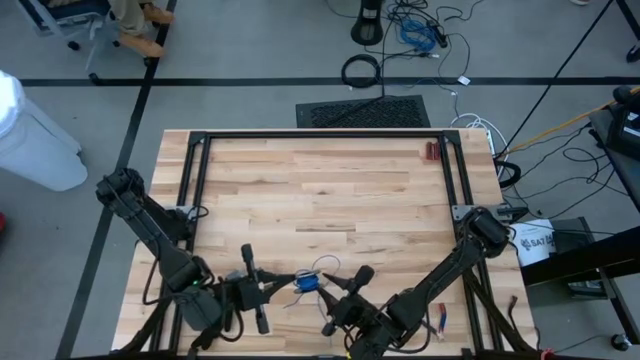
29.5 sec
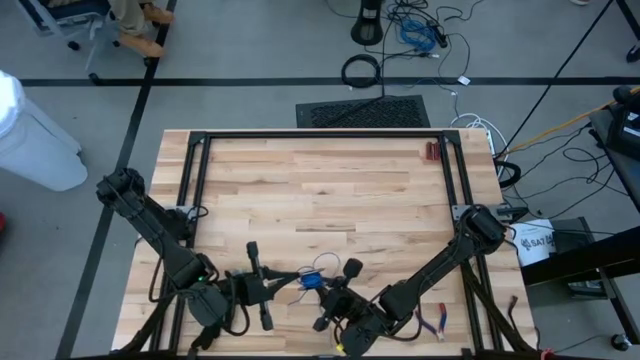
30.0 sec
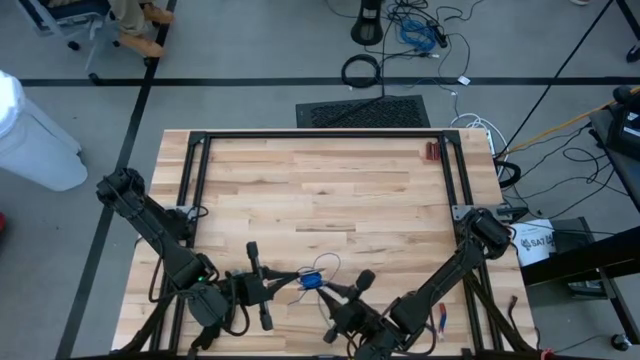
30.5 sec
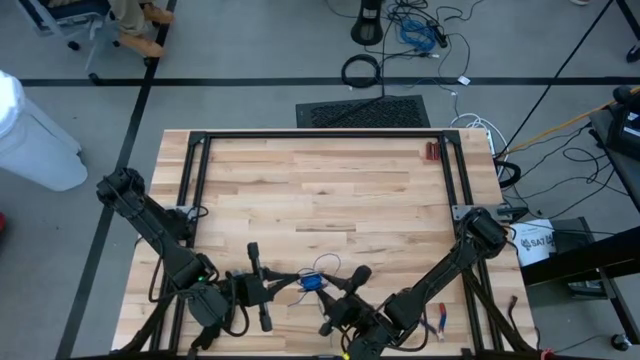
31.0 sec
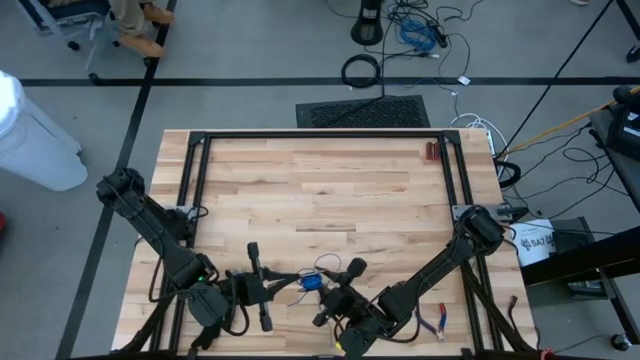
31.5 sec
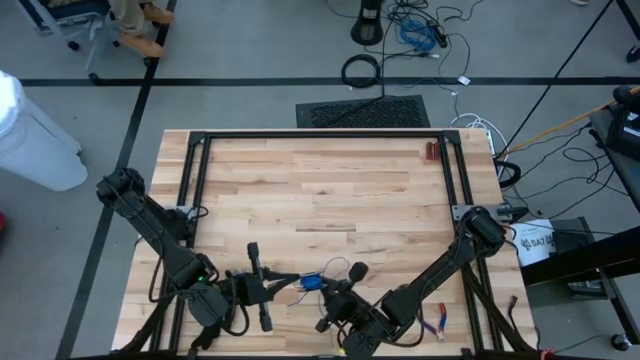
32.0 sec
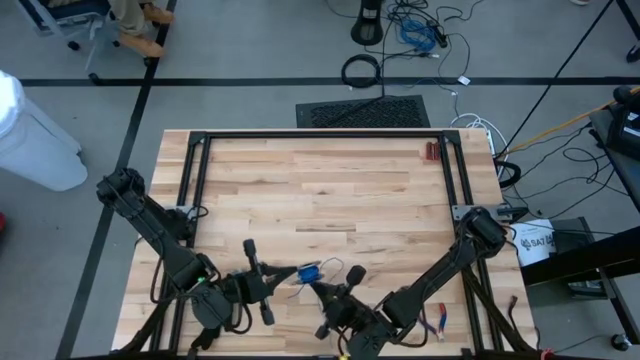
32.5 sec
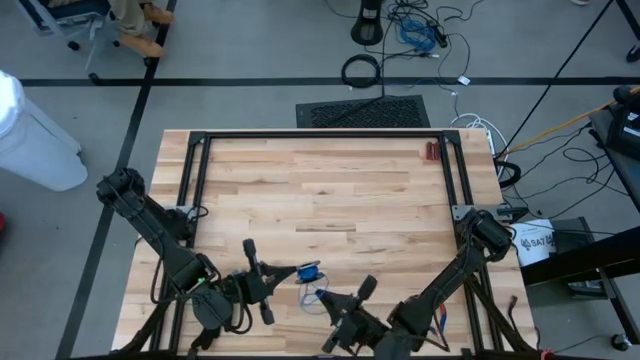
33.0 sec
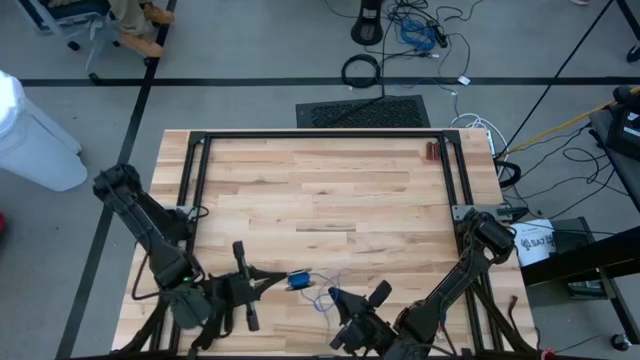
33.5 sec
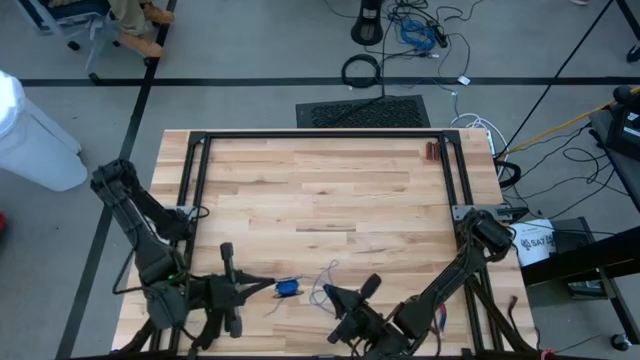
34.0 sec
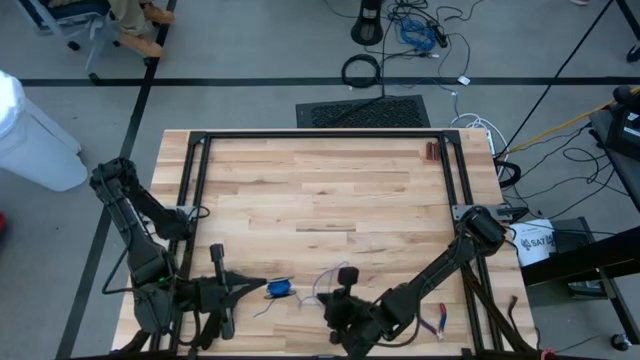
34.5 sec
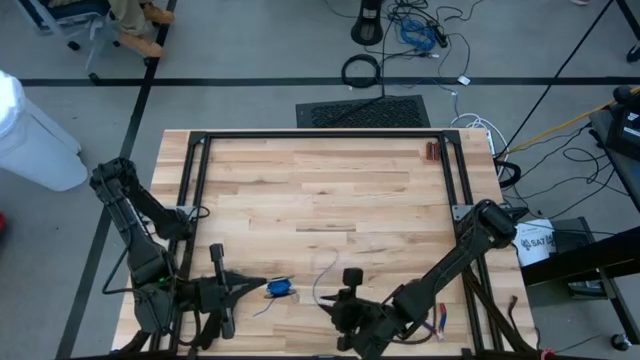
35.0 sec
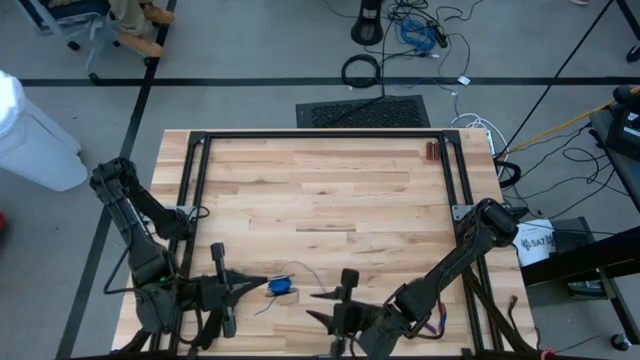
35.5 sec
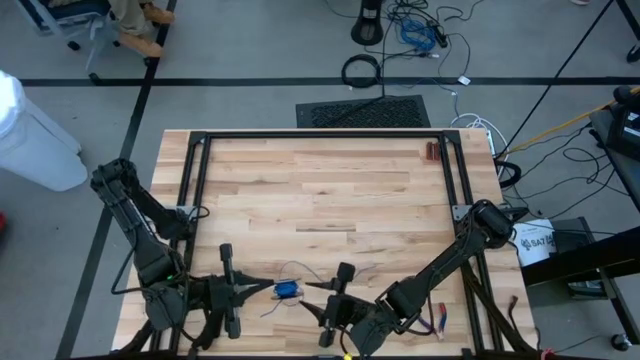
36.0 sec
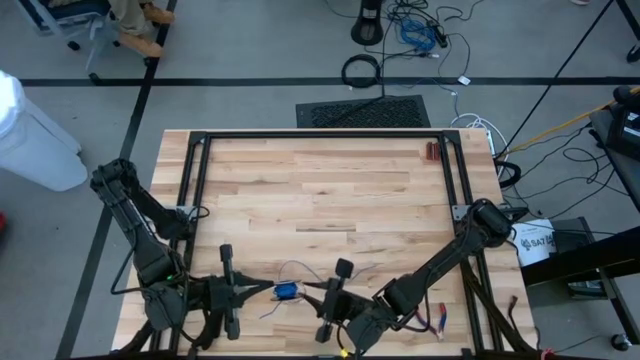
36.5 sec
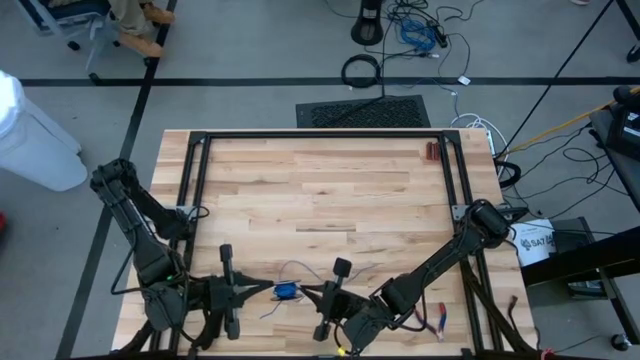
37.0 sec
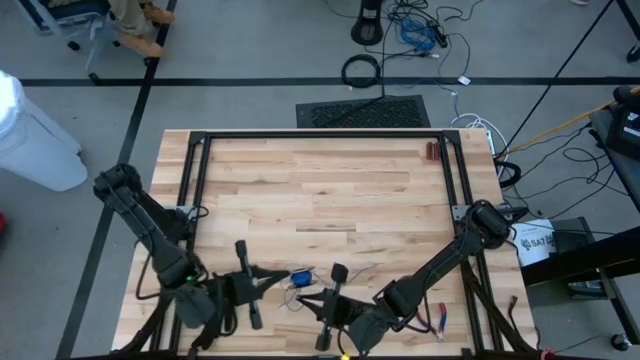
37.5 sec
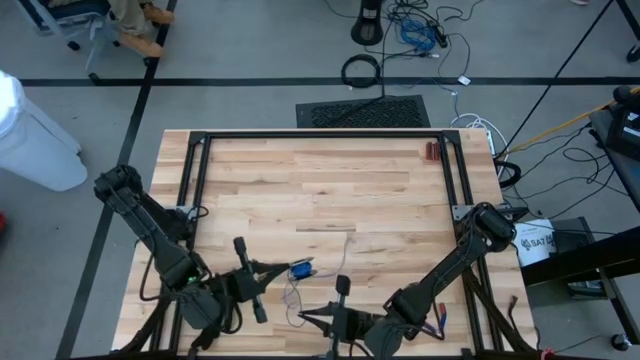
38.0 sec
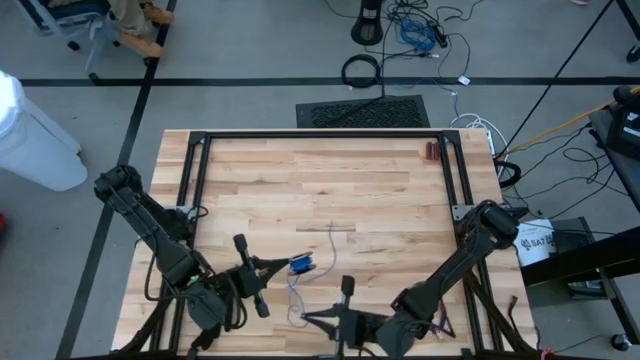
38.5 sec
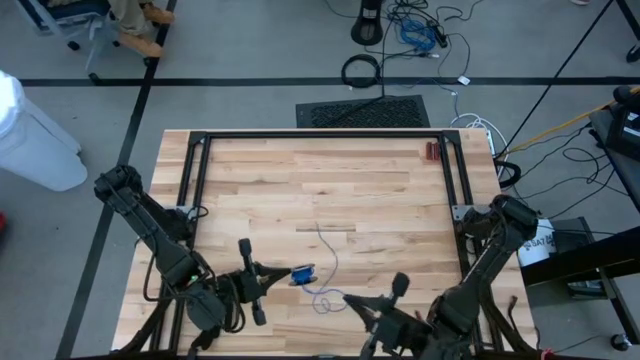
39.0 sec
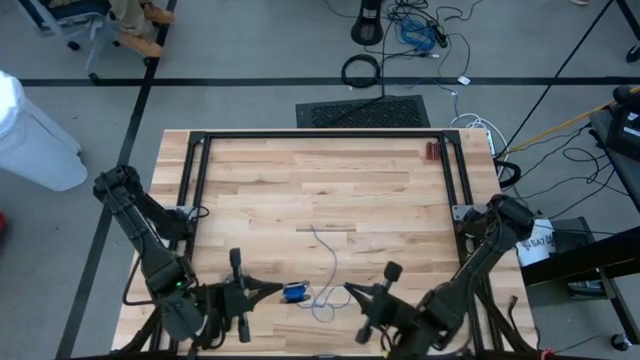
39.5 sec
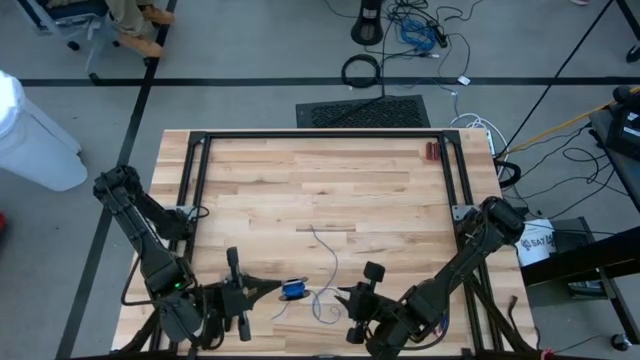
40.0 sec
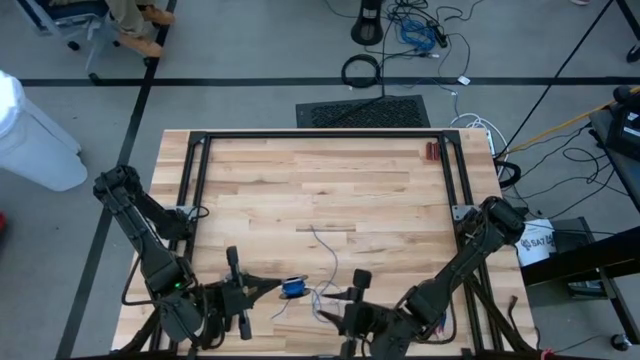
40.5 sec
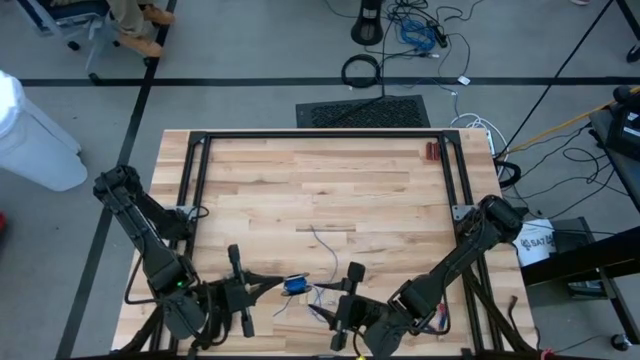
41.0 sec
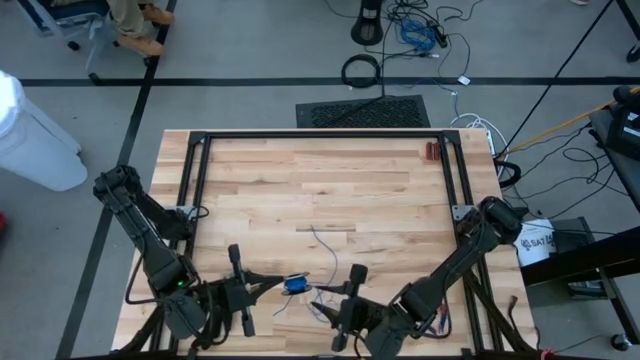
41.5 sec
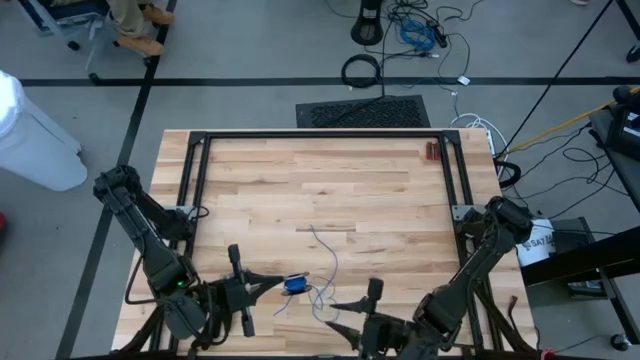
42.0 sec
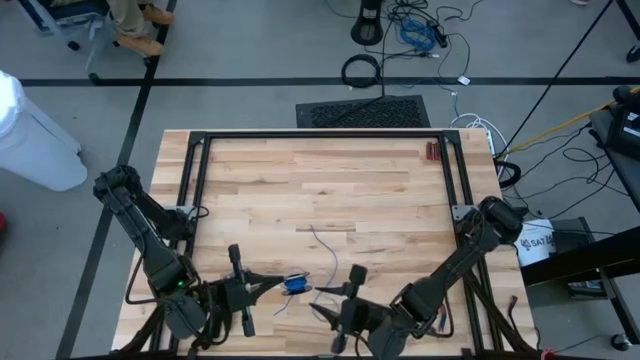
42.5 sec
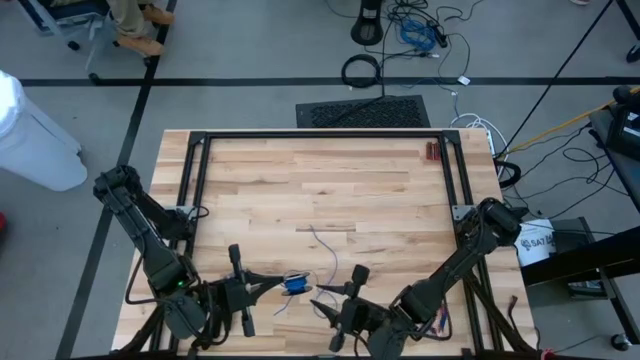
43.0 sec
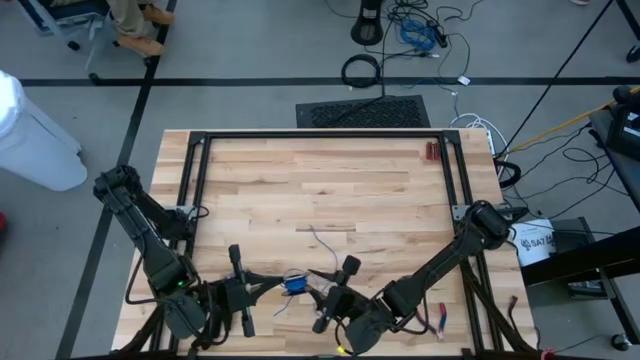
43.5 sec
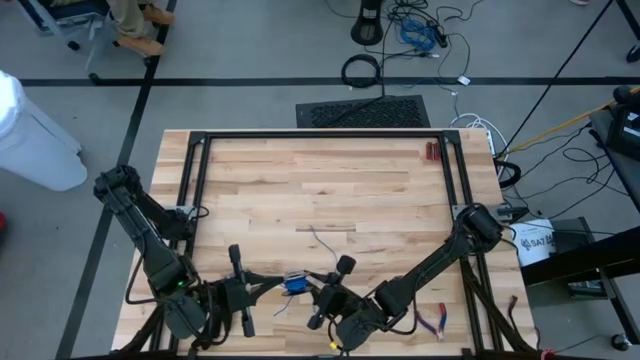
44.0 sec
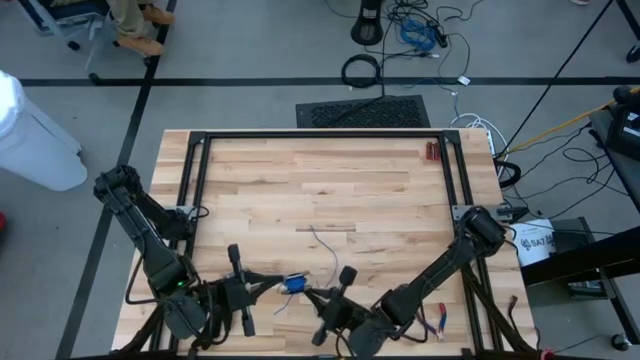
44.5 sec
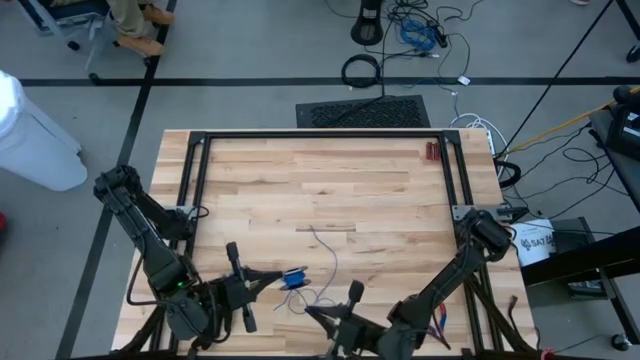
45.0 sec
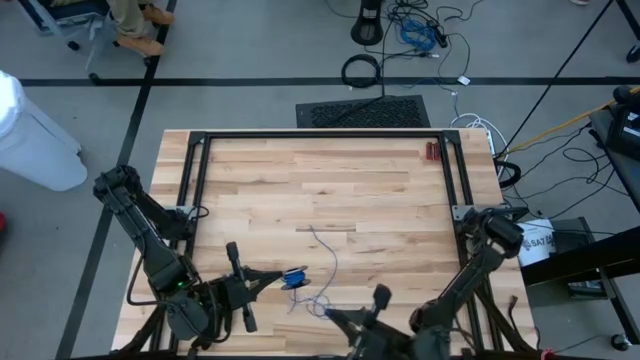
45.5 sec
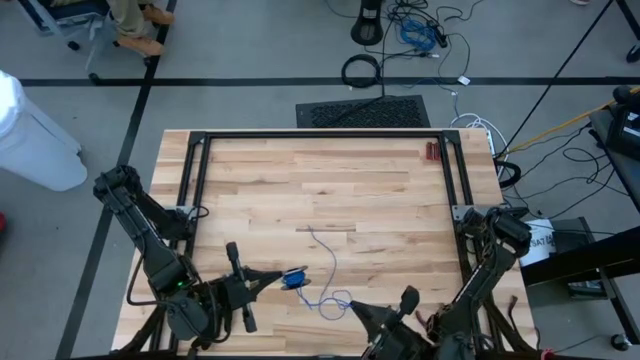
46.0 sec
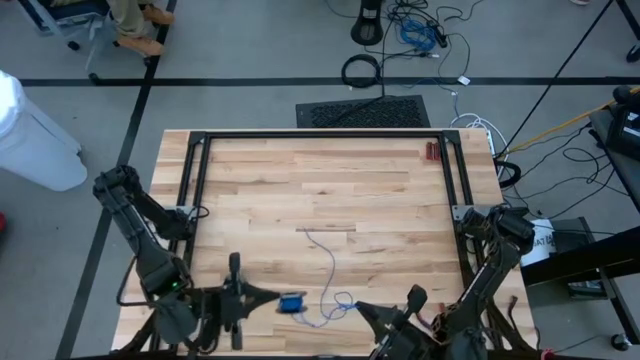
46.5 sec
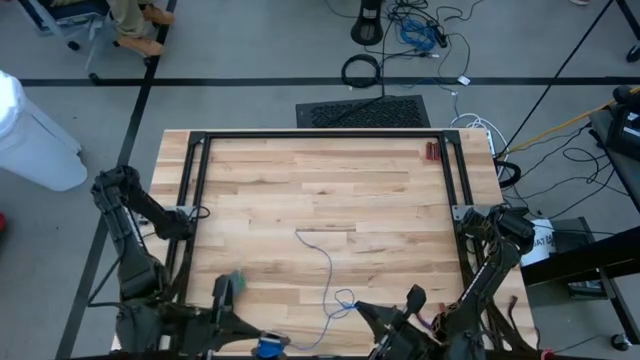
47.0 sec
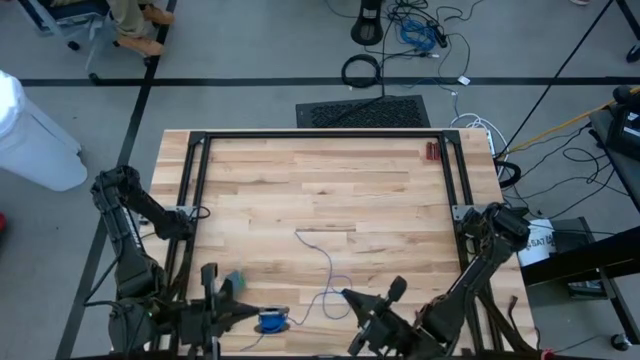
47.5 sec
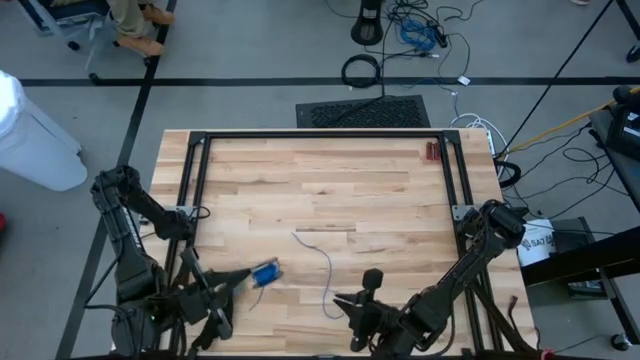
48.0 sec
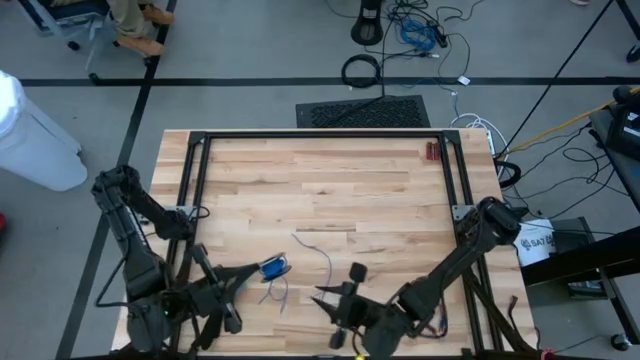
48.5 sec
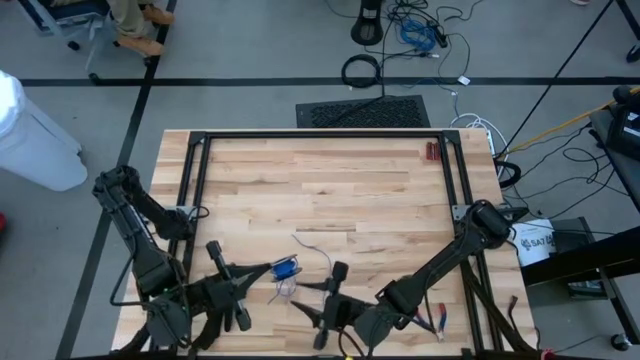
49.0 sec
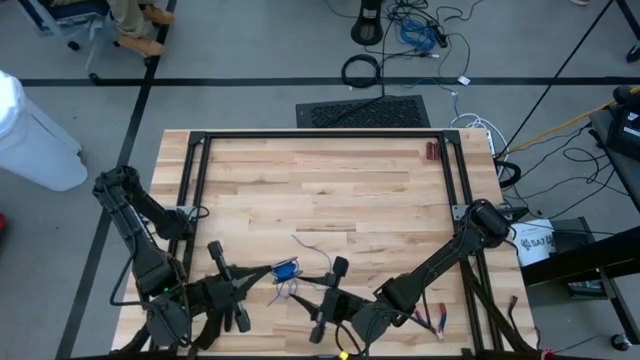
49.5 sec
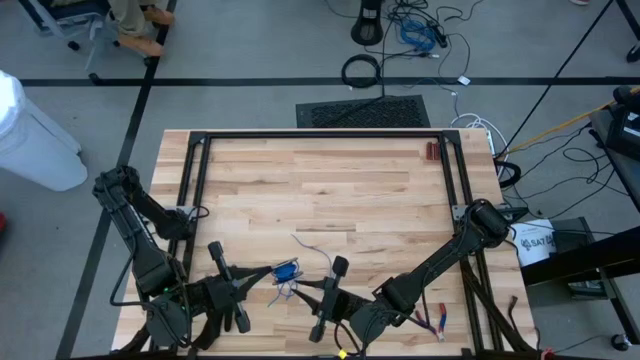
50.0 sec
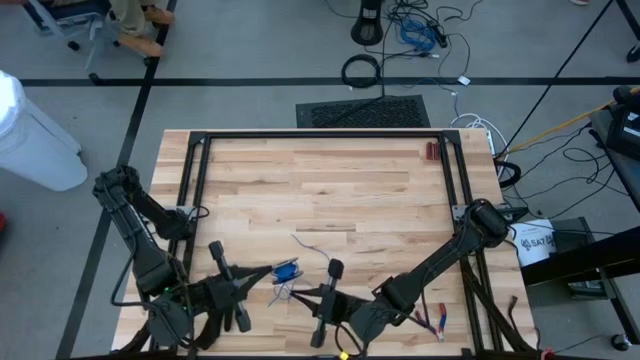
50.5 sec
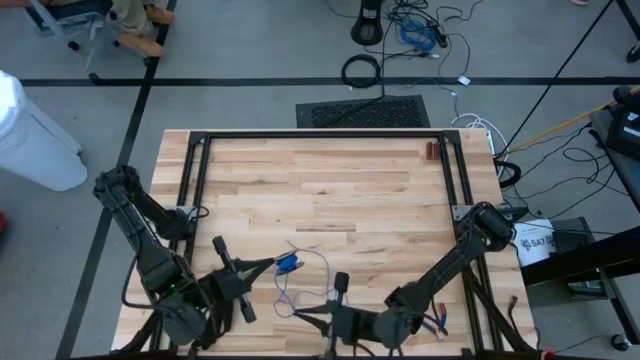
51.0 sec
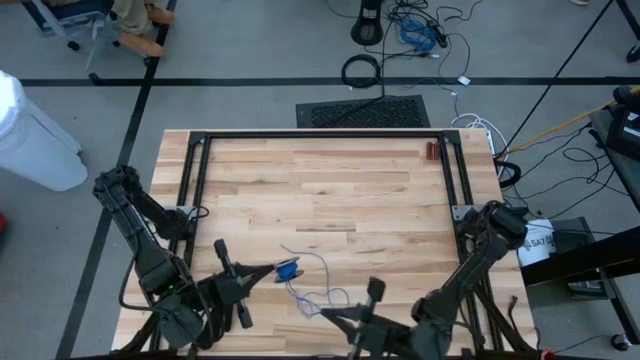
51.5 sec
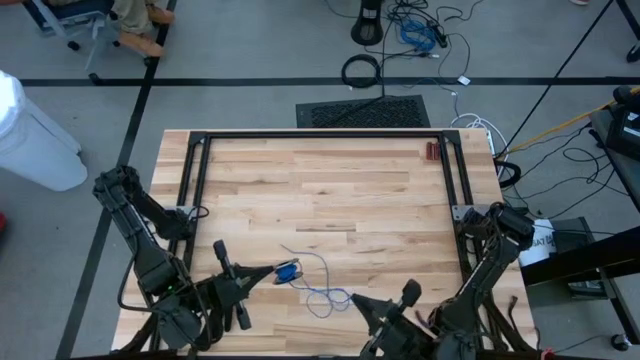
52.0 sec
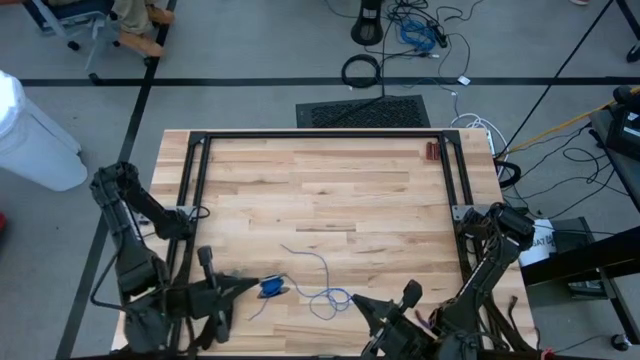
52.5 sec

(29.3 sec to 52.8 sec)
Task: Coil cords
Uncoil the blue wire from the black spool
